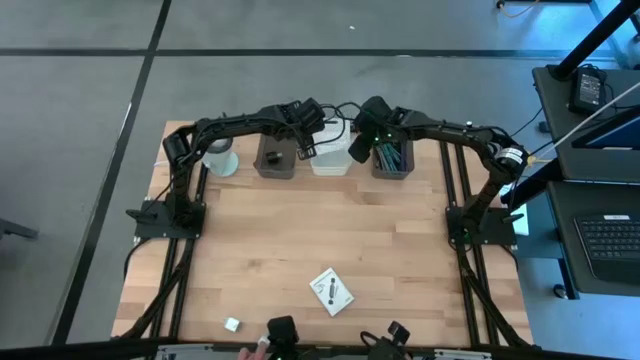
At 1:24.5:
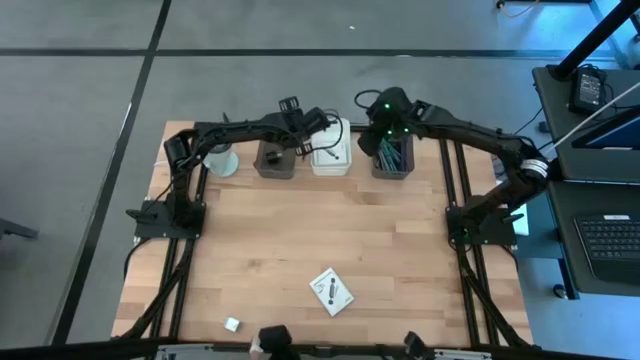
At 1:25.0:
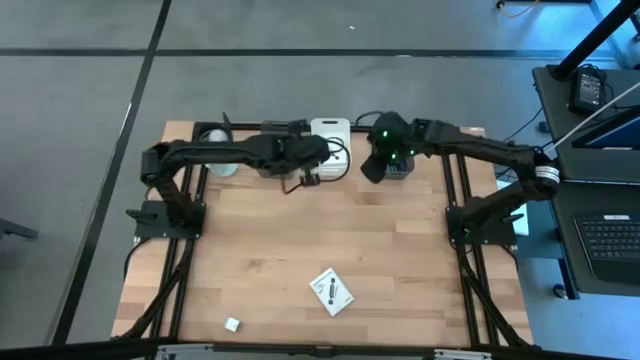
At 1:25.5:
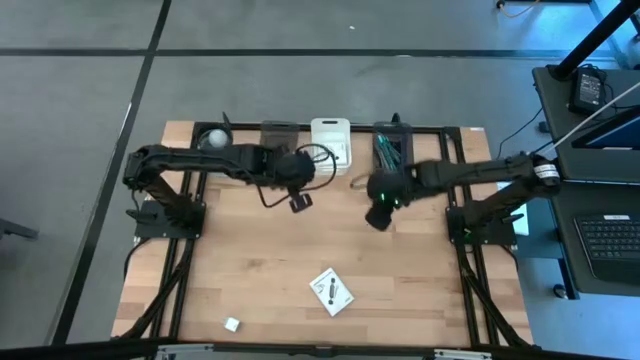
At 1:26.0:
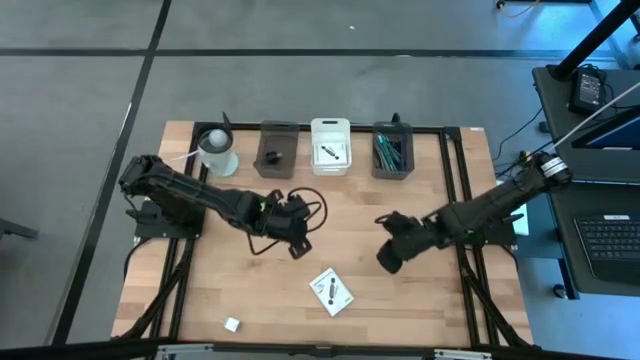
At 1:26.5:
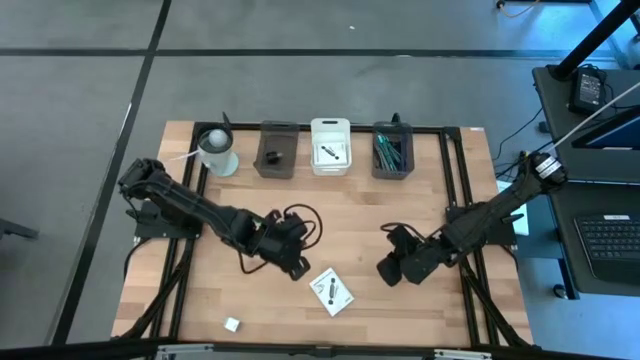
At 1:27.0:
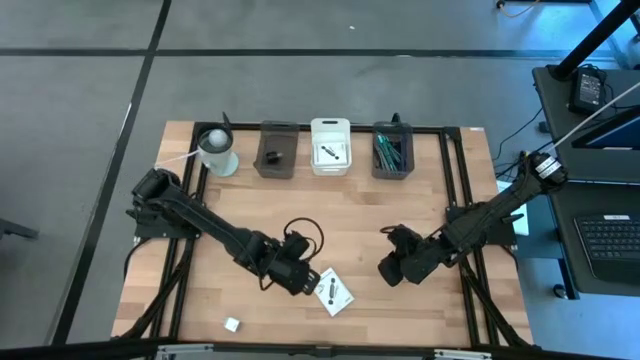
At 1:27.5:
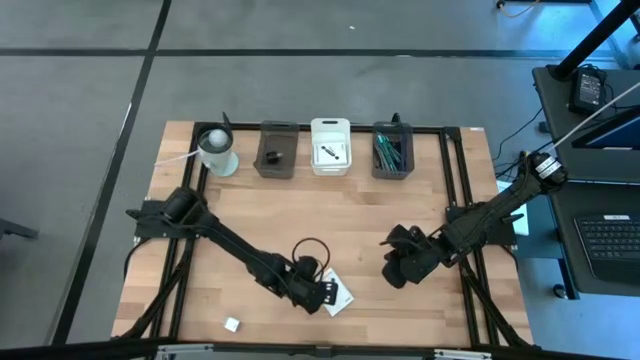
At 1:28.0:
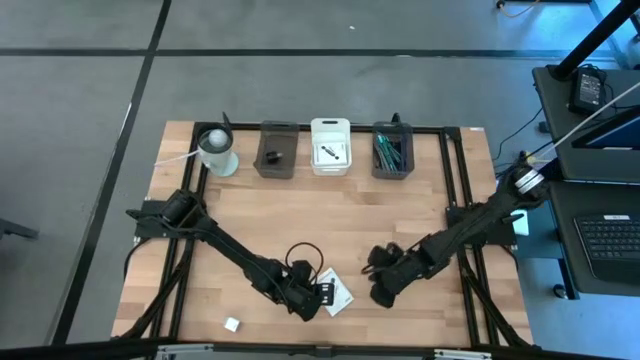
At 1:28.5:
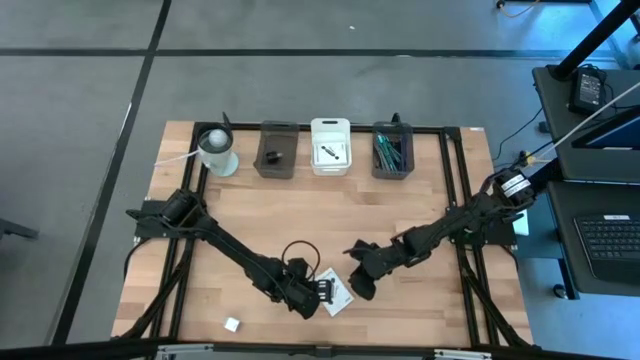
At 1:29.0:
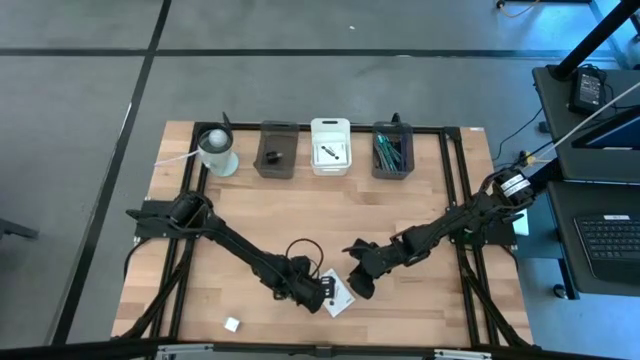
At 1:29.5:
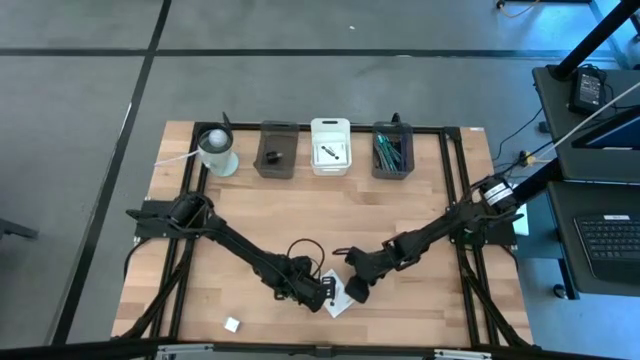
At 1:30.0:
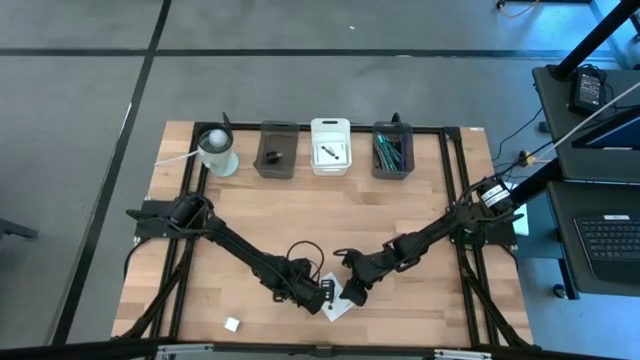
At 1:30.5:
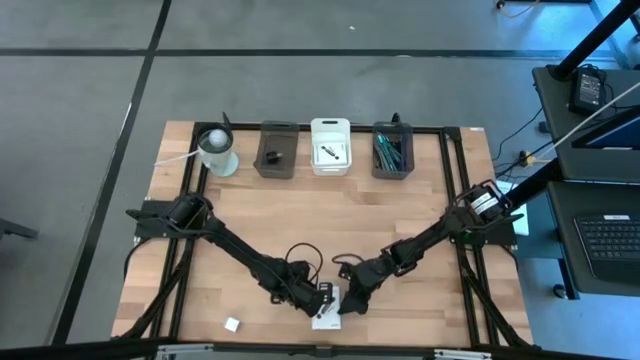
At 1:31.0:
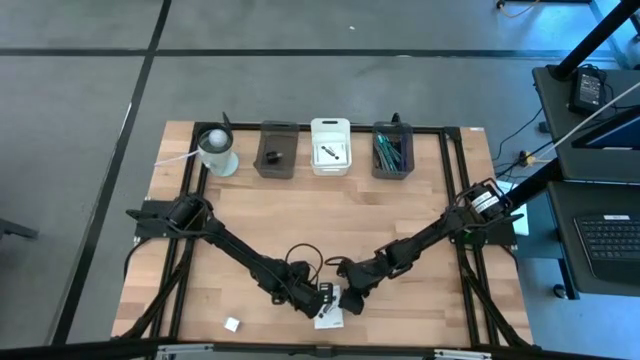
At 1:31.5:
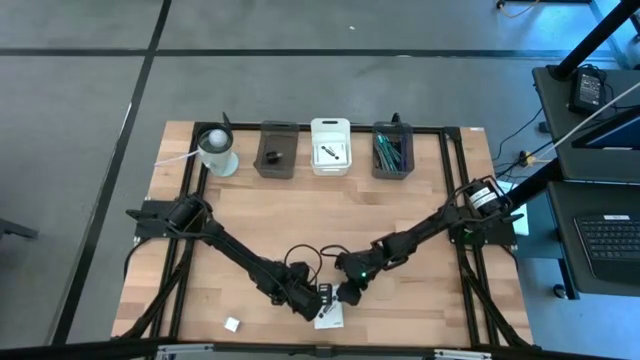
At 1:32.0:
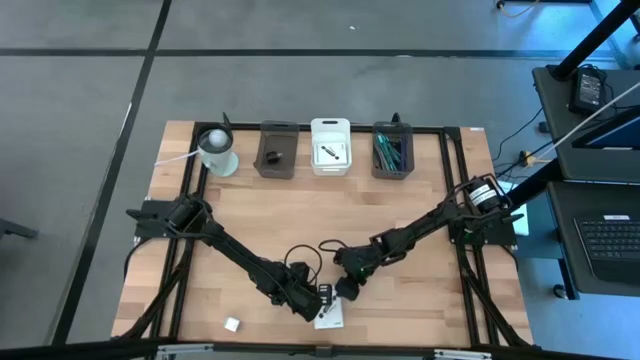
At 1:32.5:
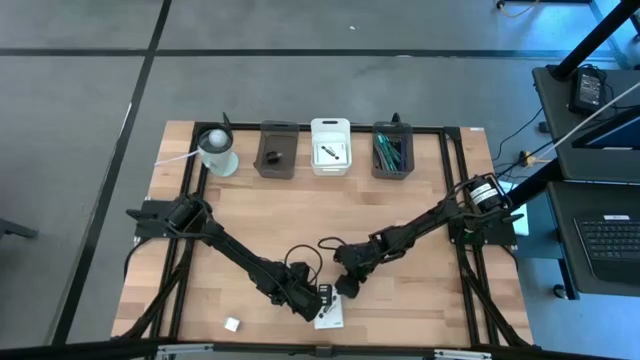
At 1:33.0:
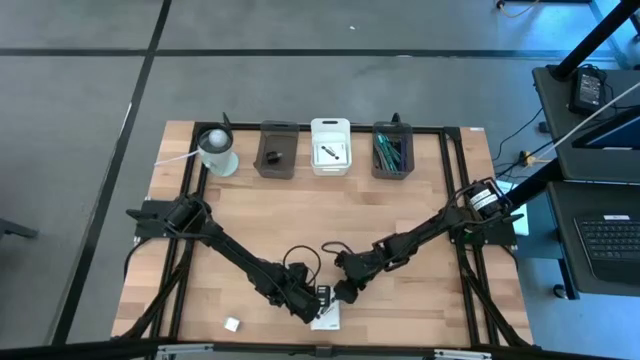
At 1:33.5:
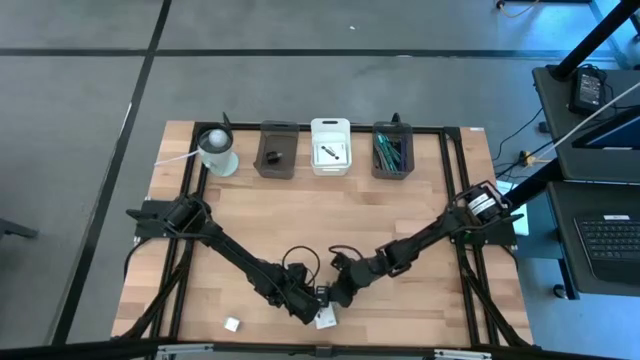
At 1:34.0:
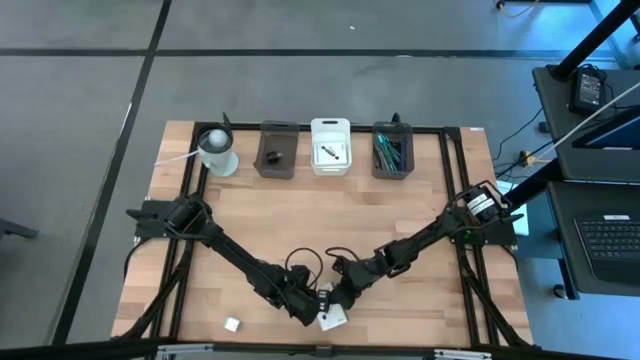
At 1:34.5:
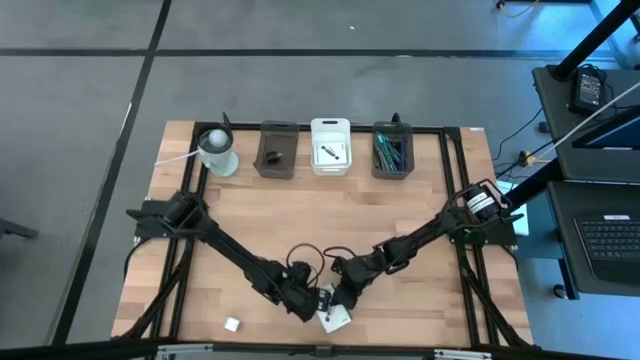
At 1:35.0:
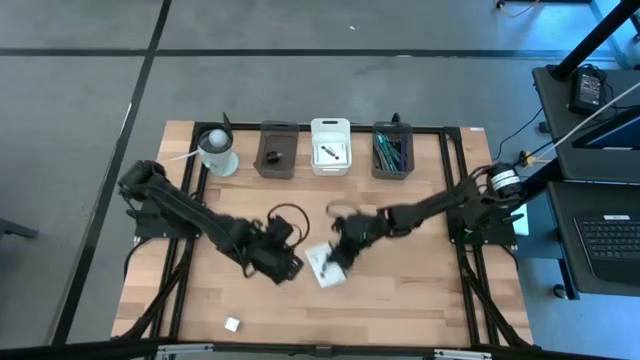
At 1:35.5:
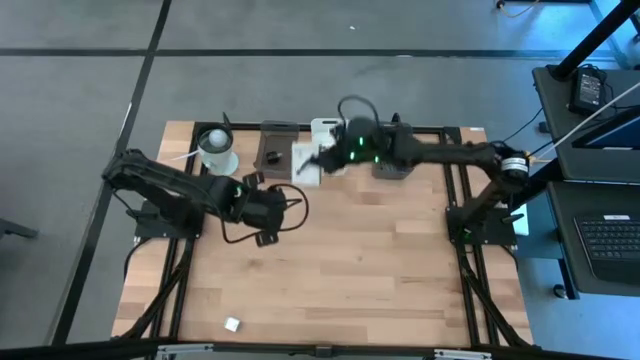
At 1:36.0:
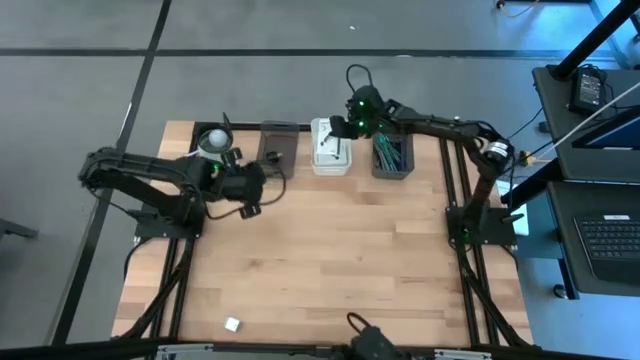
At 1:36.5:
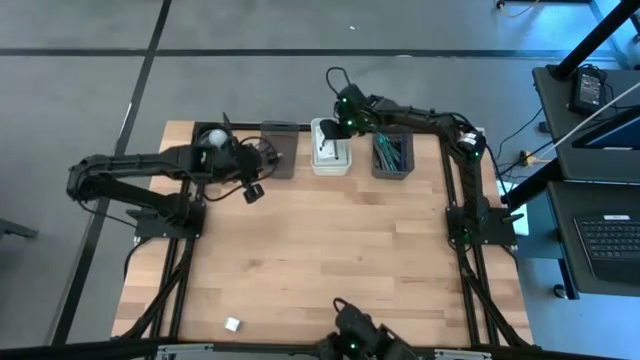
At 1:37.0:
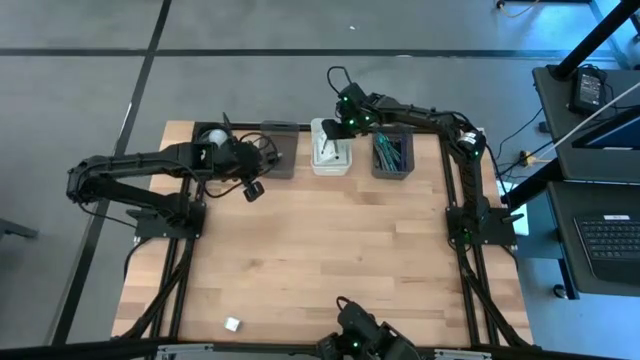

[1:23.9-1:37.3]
Task: Pick and place items into bin
Put the white card reader box into the white bin

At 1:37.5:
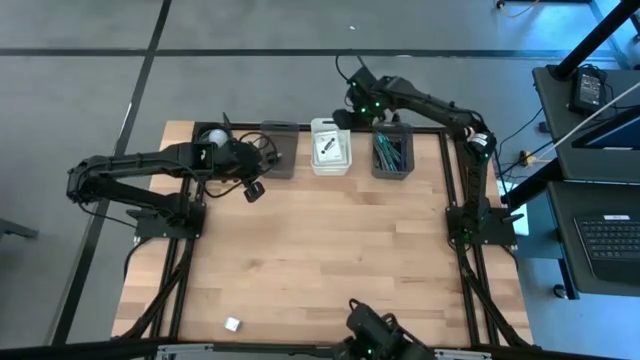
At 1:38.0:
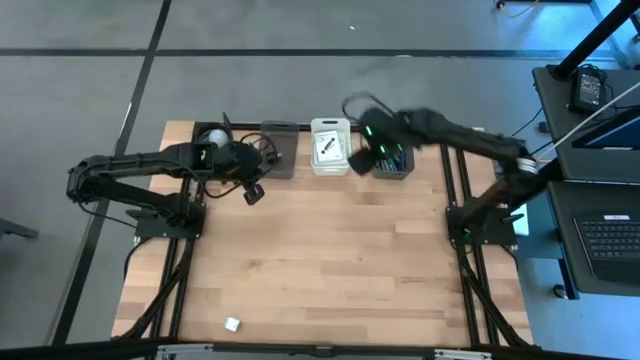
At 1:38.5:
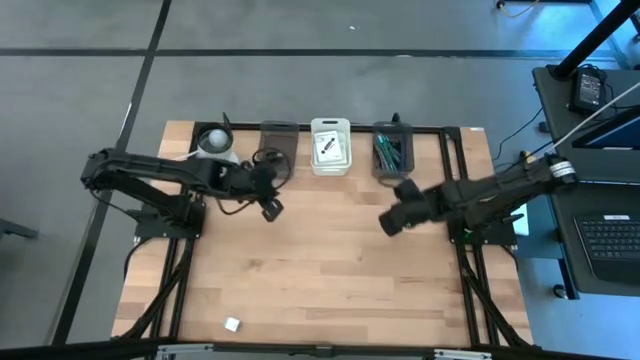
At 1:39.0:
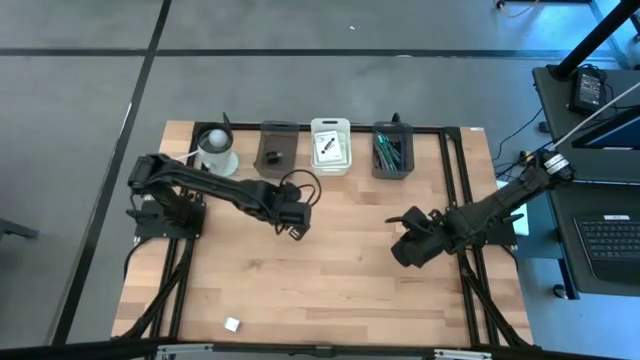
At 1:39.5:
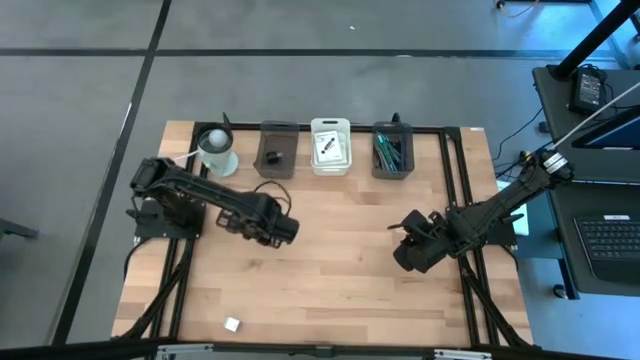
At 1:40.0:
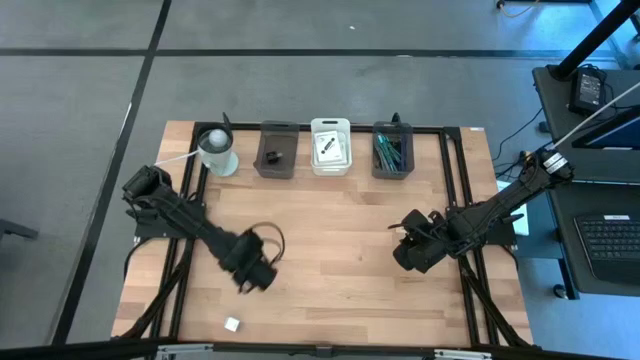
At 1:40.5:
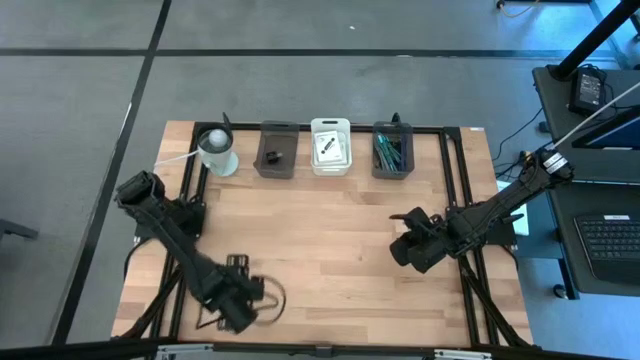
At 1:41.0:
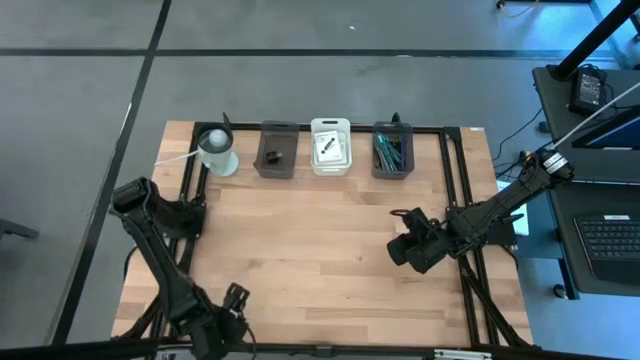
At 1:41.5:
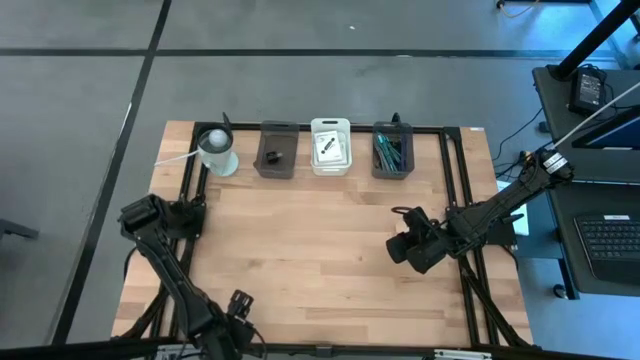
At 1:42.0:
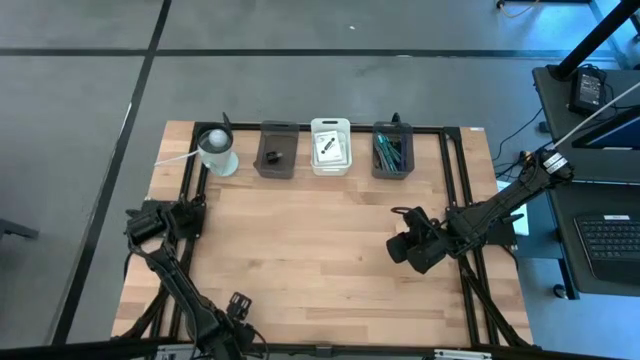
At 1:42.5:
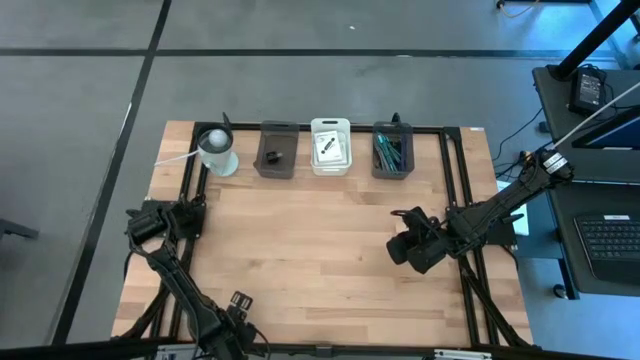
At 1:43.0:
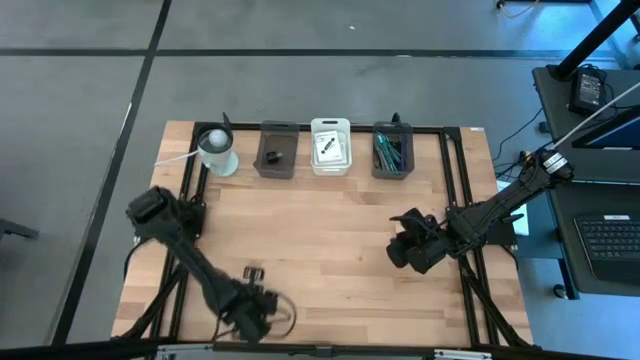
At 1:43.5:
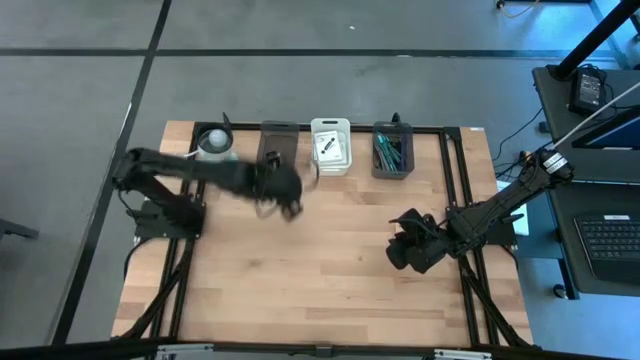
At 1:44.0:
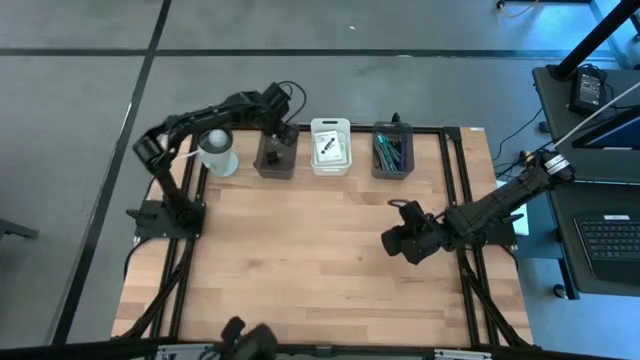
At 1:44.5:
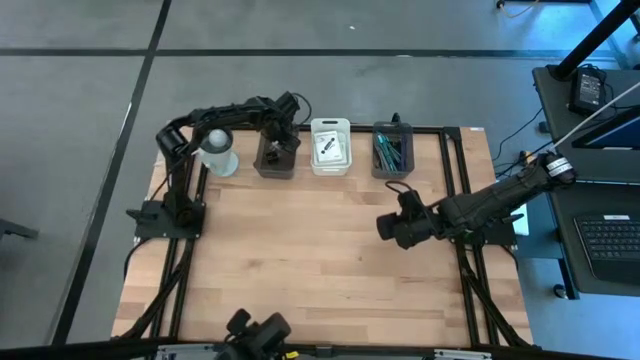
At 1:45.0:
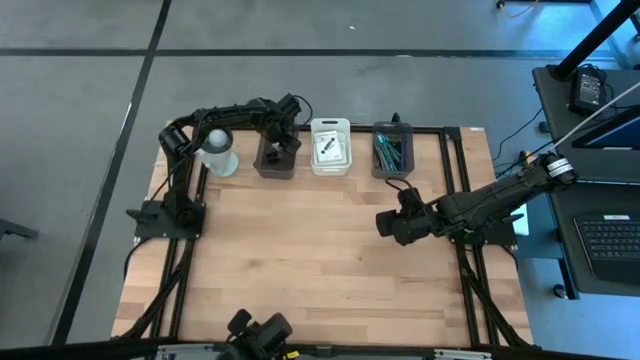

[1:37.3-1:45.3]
Put the white charger adapter into the left black bin
